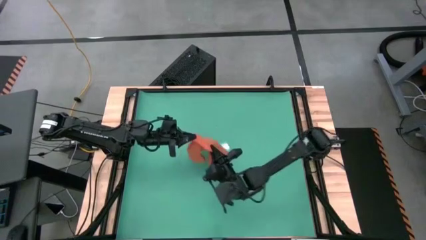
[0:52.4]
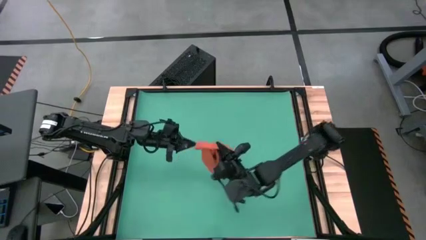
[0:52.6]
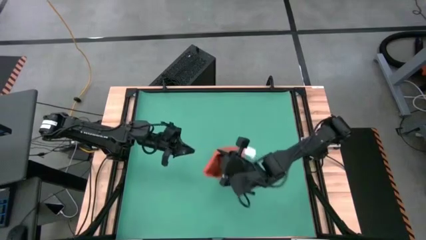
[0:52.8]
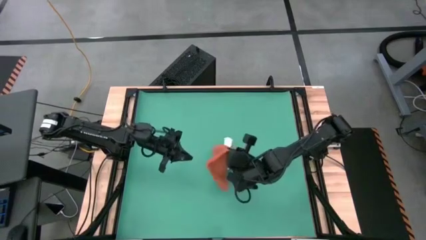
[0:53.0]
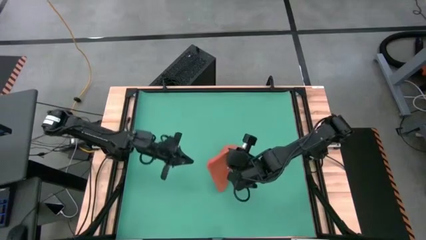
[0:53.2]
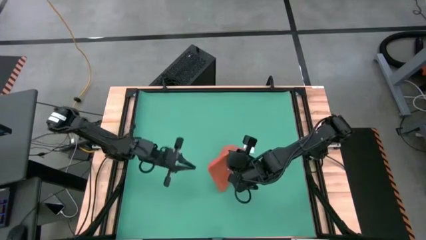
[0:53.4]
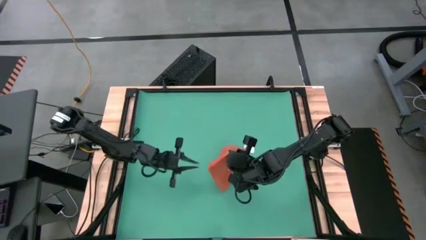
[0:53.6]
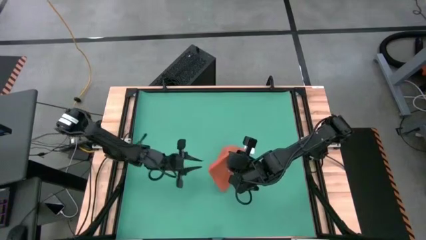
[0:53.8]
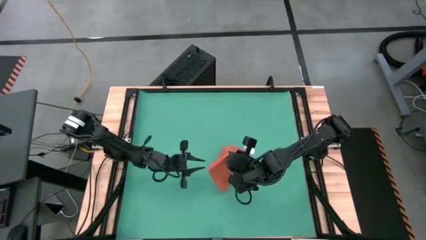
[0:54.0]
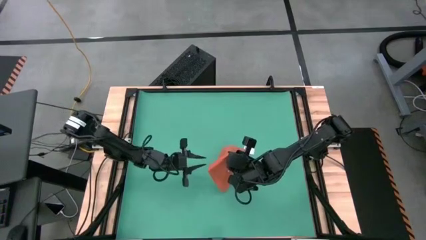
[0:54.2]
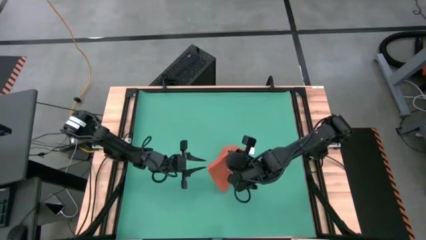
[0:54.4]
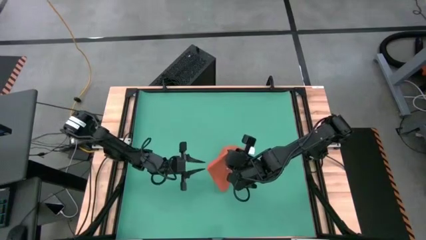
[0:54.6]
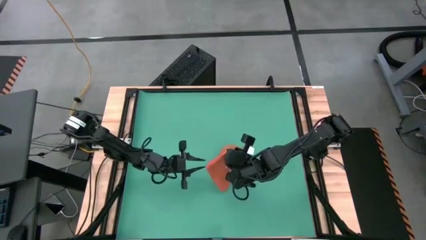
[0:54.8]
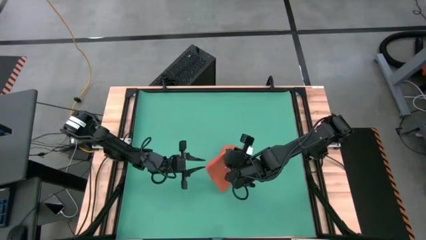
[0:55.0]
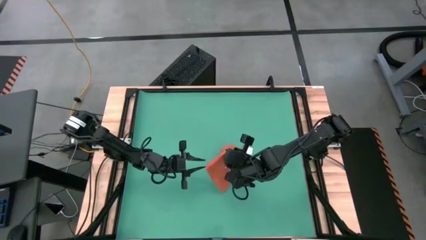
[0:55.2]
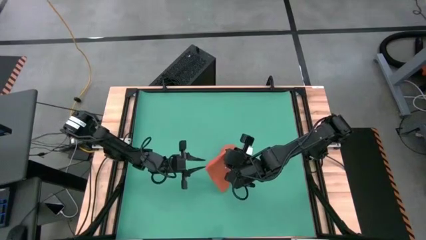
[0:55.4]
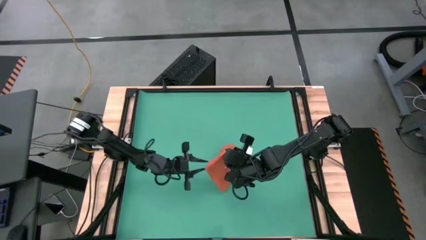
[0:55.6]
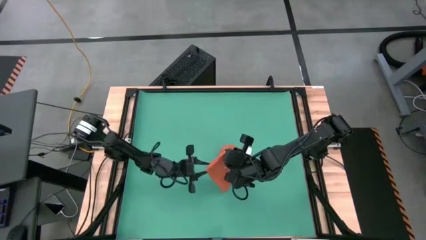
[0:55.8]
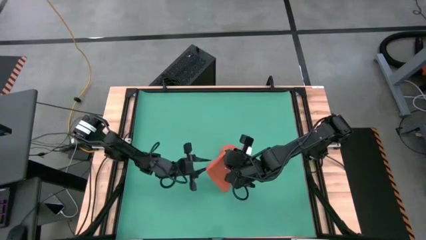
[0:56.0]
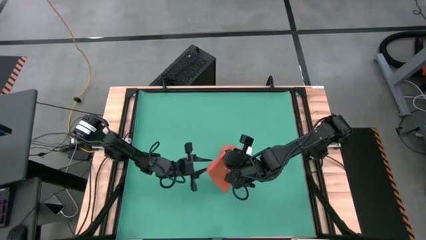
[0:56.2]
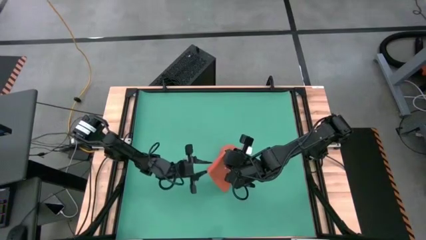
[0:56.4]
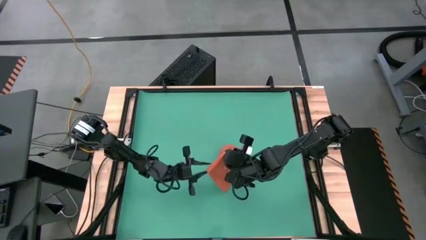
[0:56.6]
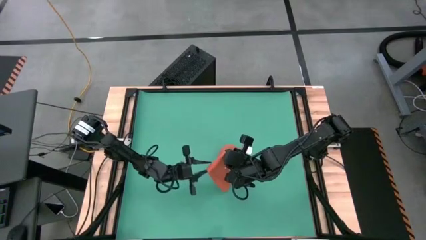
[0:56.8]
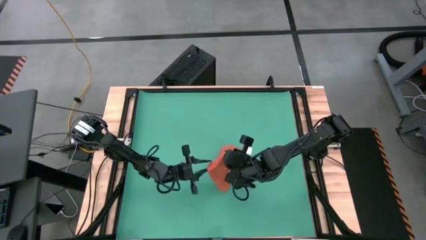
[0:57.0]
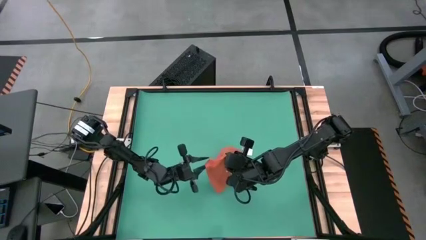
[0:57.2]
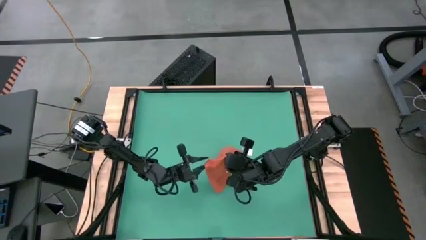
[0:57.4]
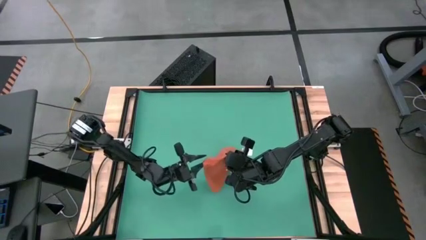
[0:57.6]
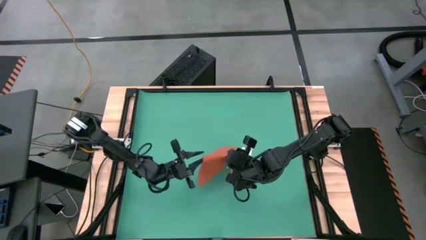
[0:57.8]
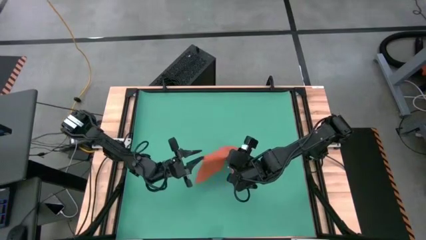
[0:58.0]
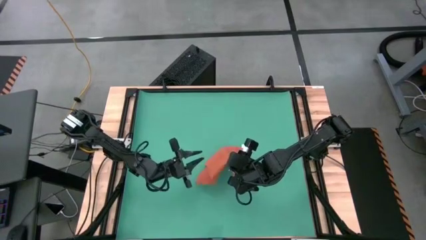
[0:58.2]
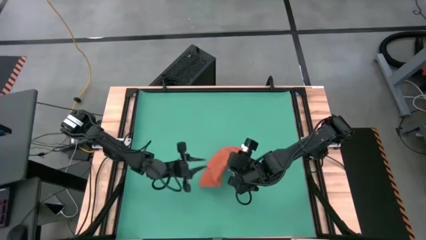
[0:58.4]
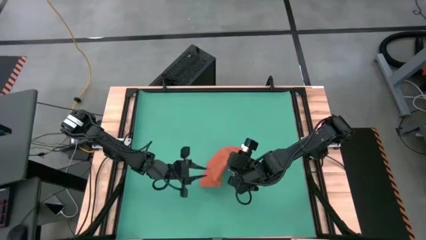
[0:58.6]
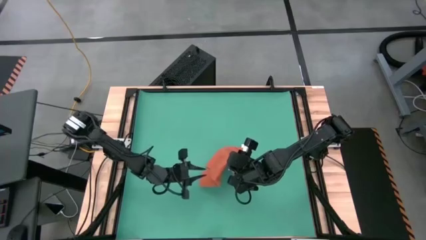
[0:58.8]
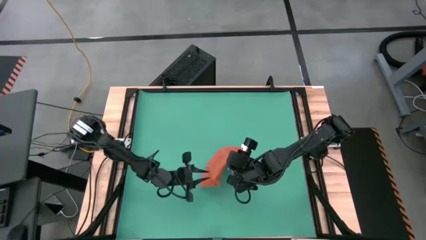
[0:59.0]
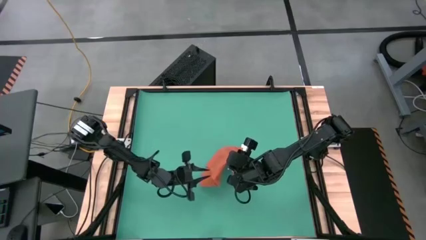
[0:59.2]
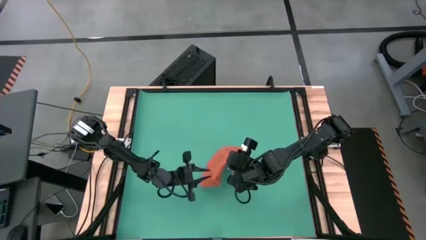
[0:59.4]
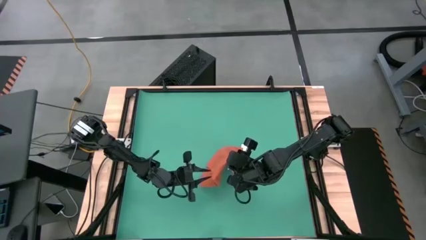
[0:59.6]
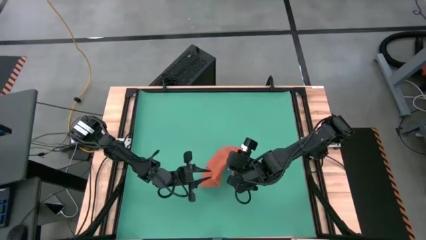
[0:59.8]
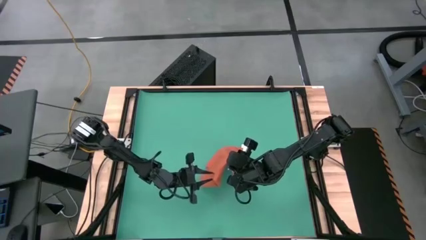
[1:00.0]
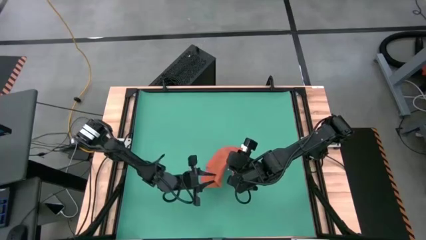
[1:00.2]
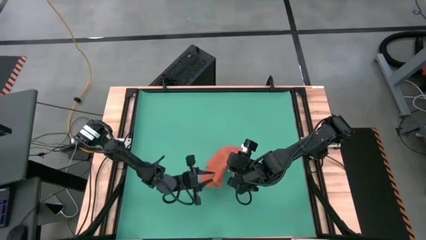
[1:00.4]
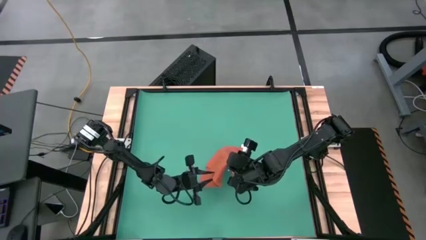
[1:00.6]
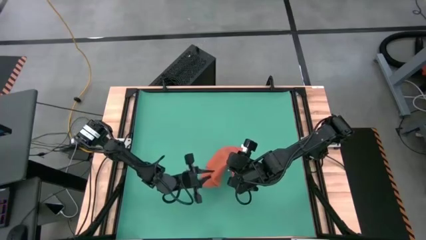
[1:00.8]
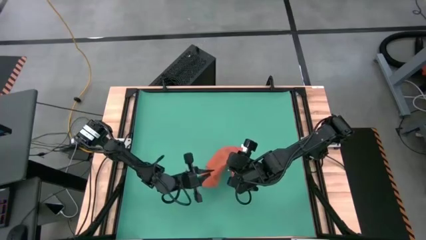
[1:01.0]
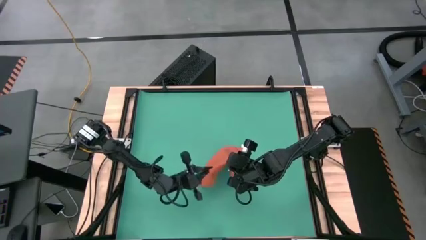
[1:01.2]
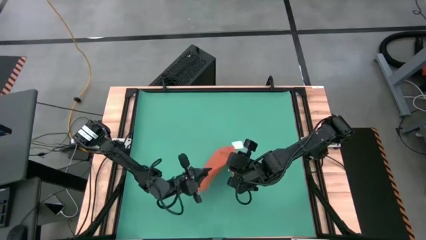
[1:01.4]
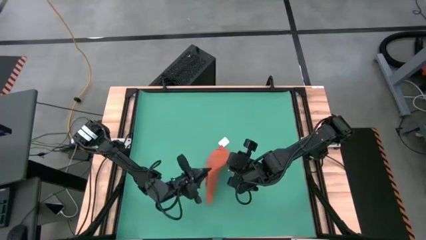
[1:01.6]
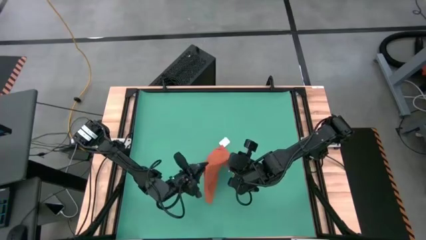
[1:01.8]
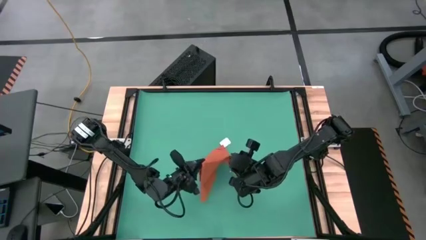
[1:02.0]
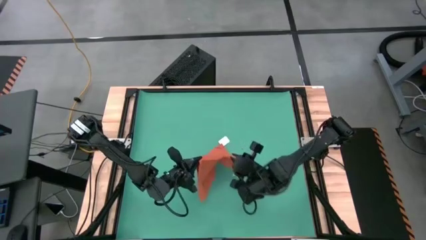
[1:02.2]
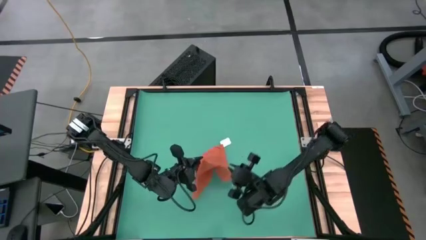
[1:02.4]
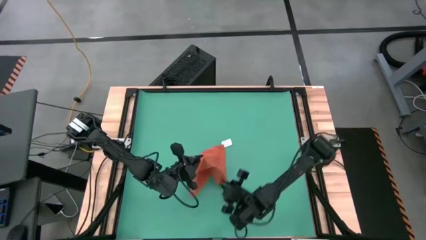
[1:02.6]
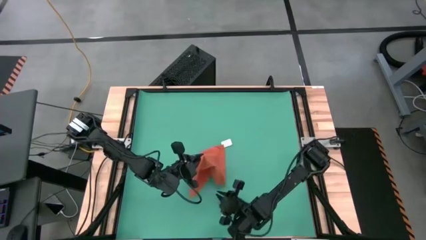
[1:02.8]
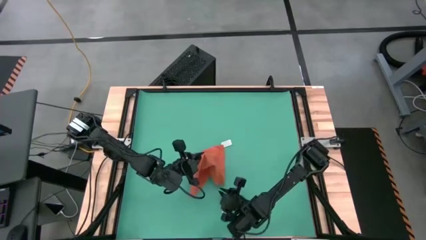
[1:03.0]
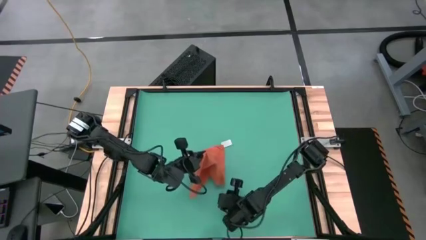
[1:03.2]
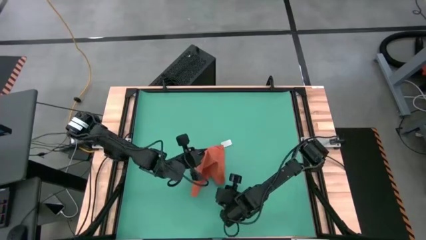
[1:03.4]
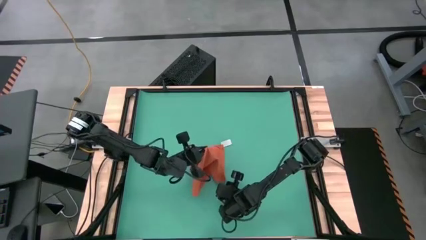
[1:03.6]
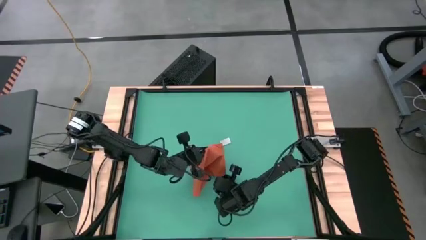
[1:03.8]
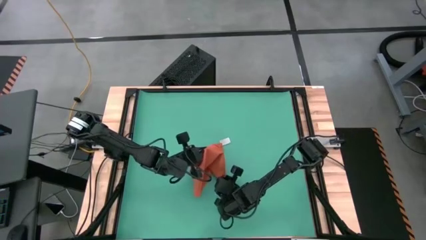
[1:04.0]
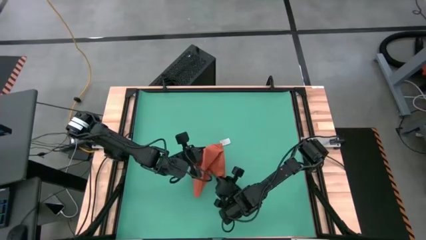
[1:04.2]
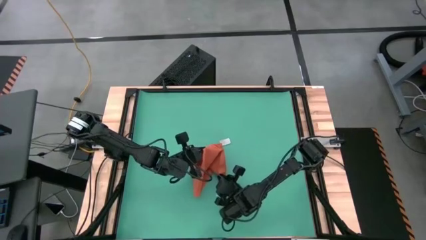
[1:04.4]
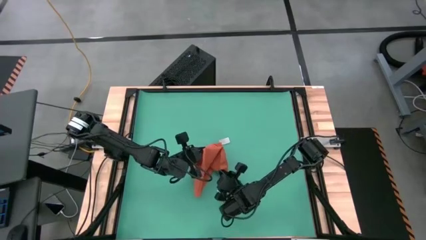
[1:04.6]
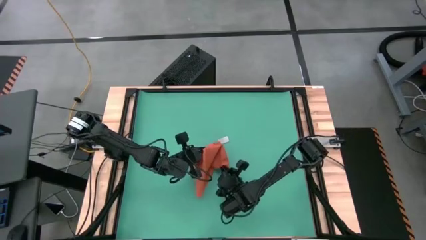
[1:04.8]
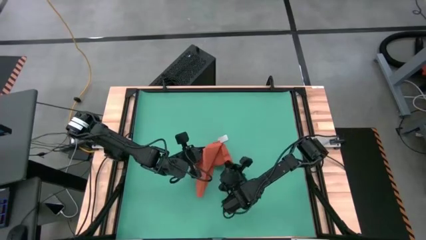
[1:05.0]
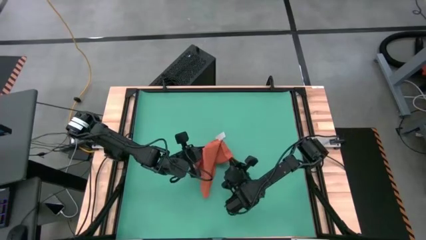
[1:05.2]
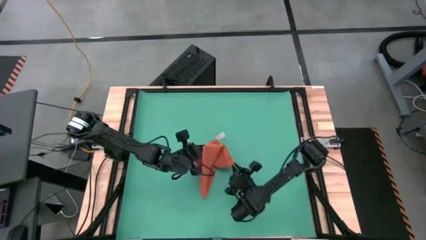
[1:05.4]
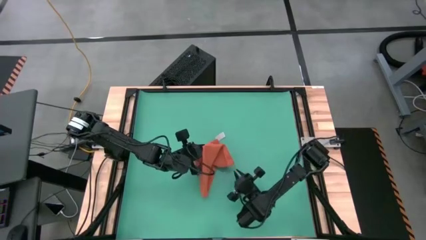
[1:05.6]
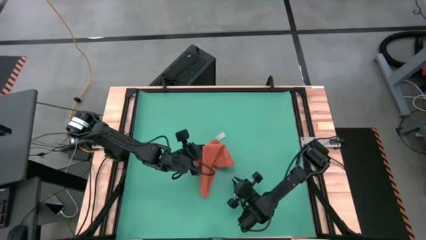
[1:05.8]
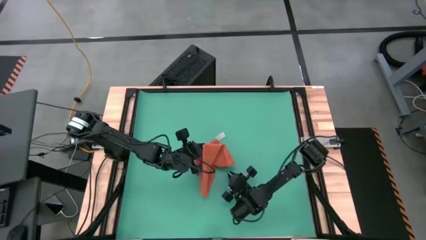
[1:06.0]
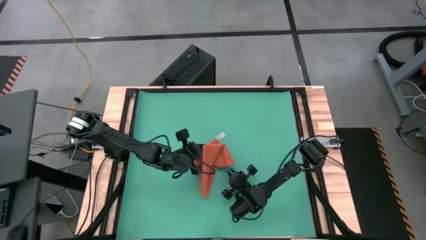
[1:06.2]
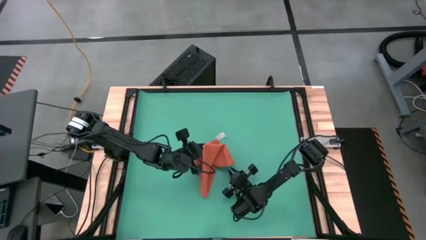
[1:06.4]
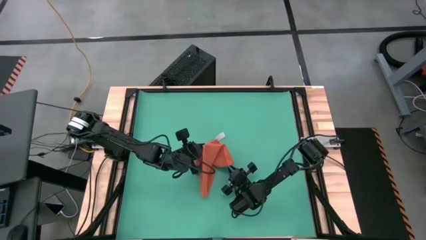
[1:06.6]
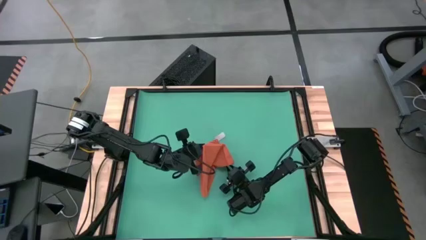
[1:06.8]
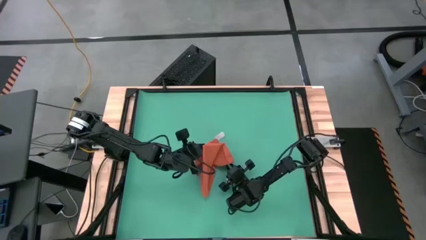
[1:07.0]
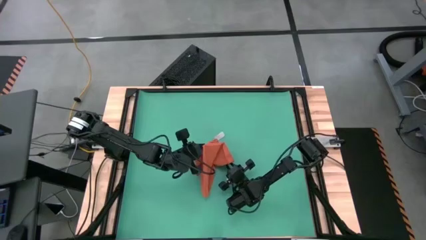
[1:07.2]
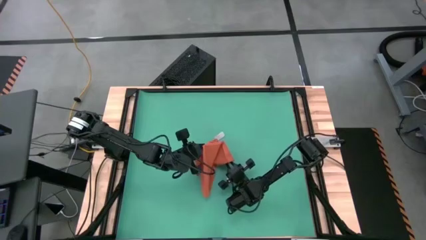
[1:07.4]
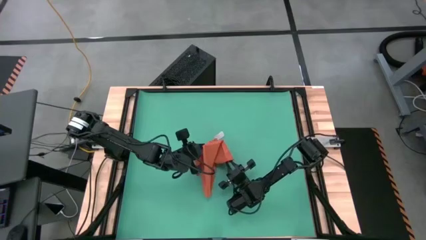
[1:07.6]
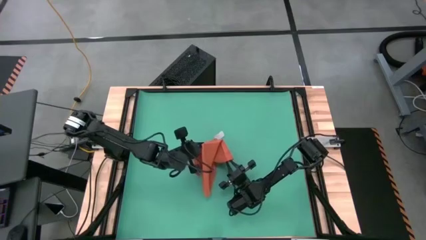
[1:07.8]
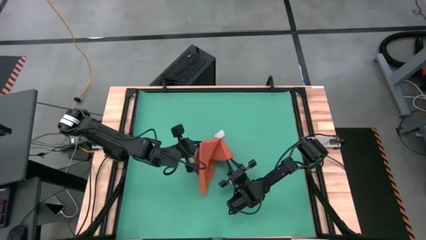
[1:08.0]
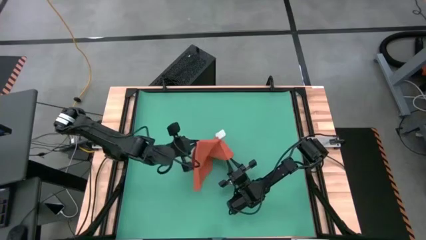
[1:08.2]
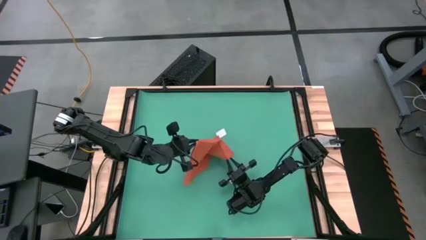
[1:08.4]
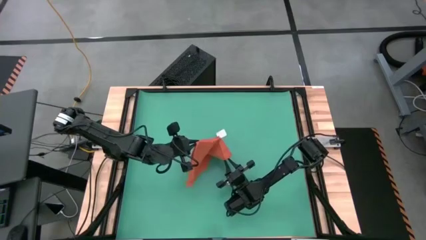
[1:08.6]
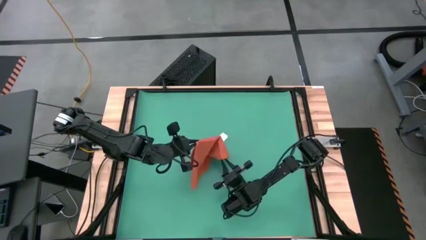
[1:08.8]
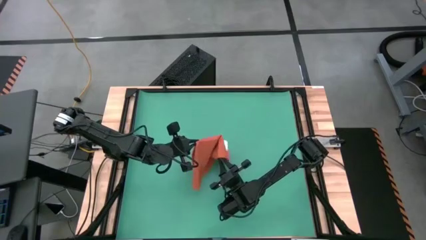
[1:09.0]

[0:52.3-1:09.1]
Task: Roll napkin
Fold the orange table napkin

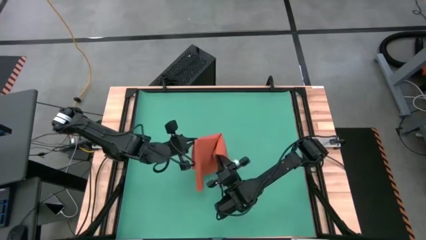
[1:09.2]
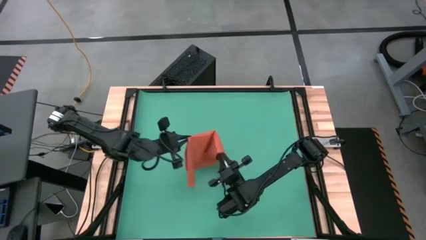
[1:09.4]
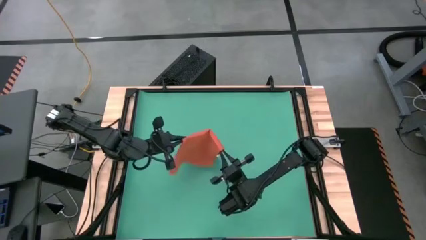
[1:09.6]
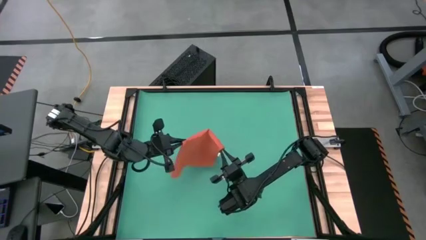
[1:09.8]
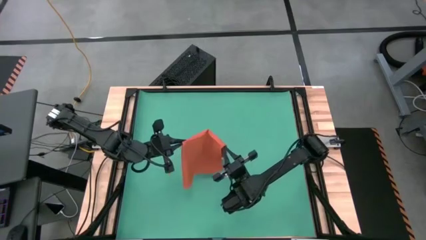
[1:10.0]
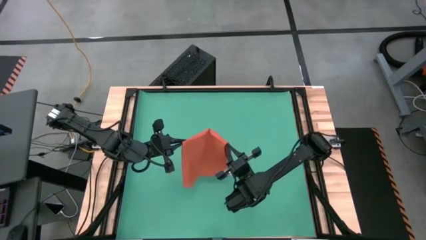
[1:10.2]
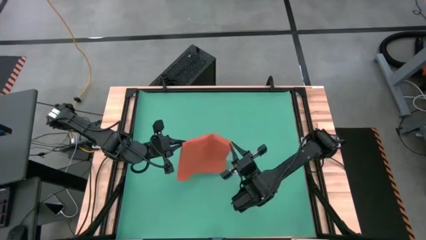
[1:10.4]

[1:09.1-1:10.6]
Fold the orange table napkin
